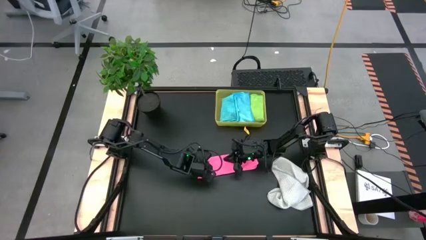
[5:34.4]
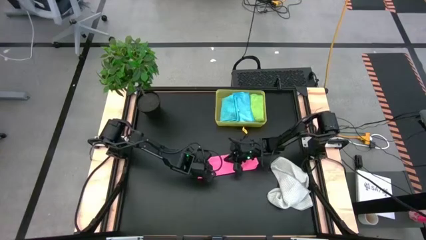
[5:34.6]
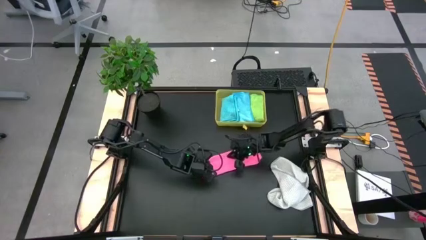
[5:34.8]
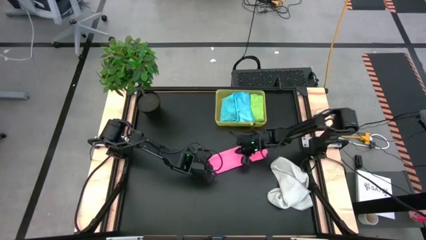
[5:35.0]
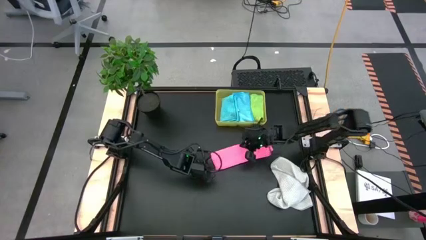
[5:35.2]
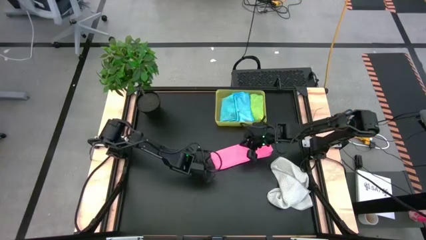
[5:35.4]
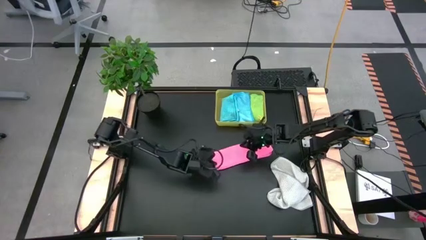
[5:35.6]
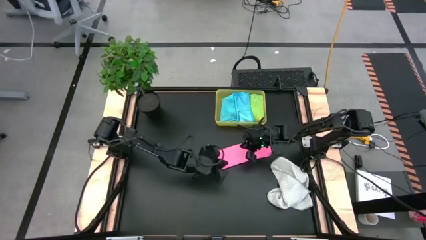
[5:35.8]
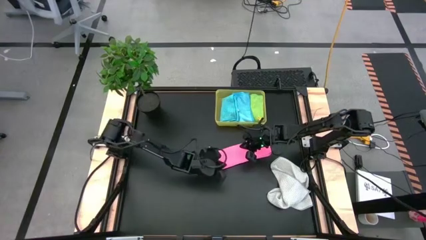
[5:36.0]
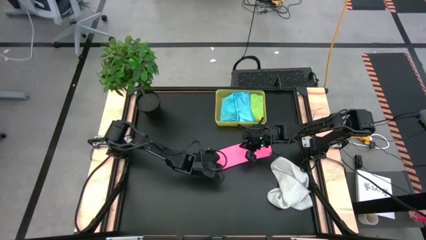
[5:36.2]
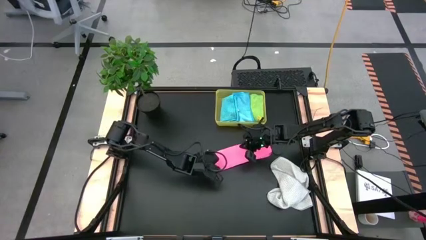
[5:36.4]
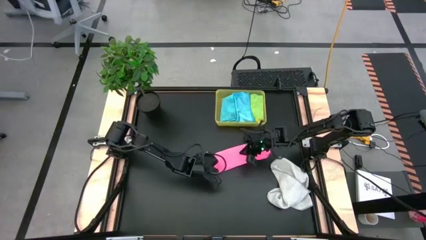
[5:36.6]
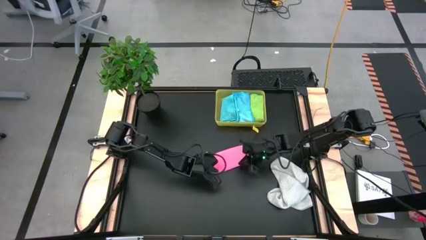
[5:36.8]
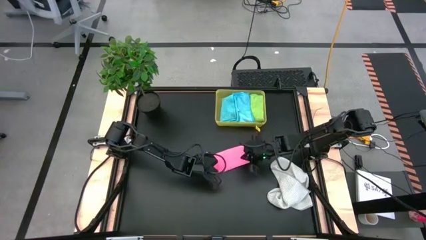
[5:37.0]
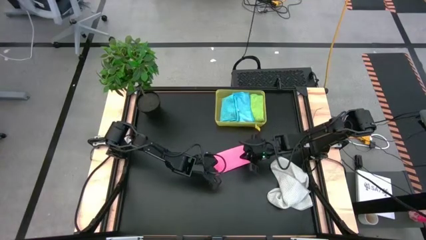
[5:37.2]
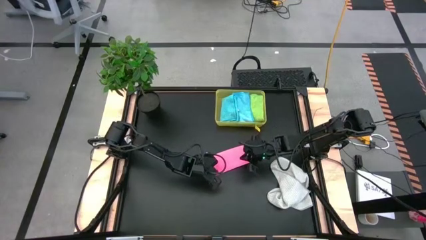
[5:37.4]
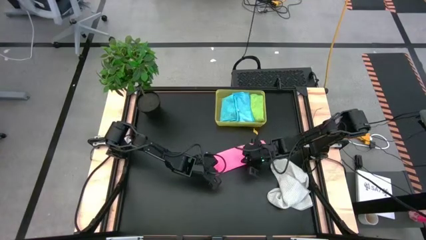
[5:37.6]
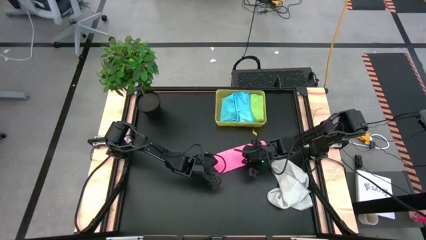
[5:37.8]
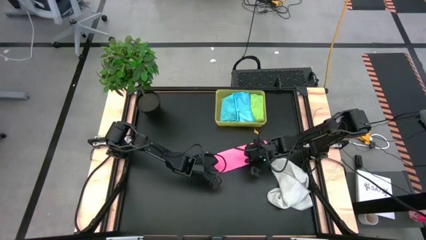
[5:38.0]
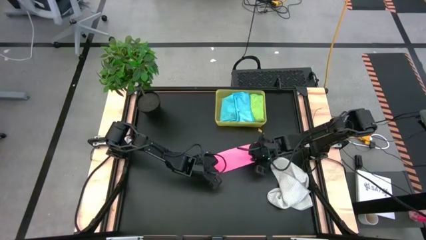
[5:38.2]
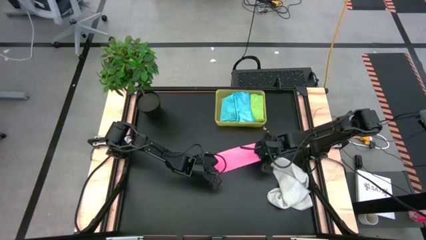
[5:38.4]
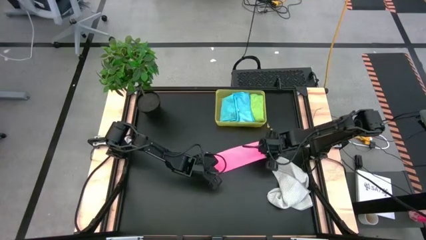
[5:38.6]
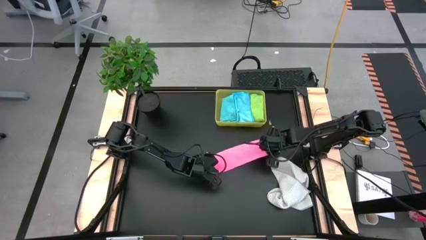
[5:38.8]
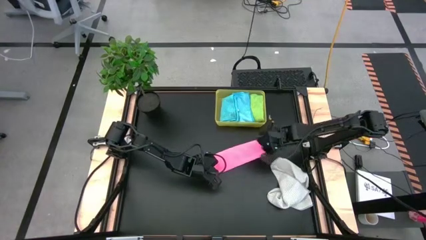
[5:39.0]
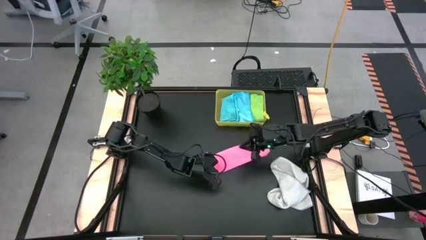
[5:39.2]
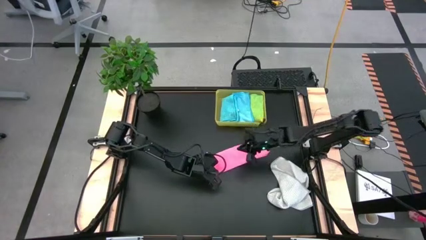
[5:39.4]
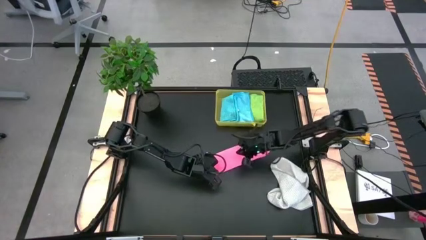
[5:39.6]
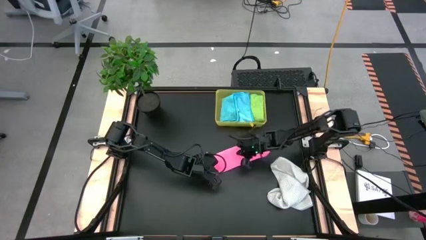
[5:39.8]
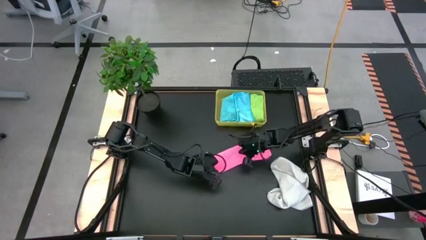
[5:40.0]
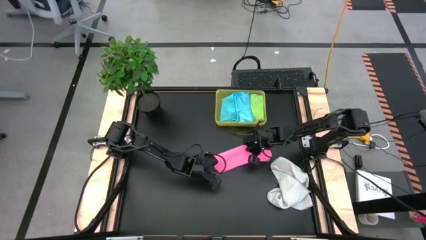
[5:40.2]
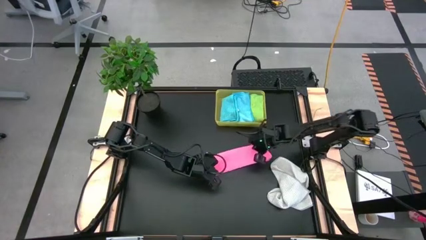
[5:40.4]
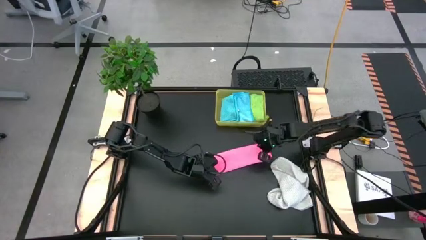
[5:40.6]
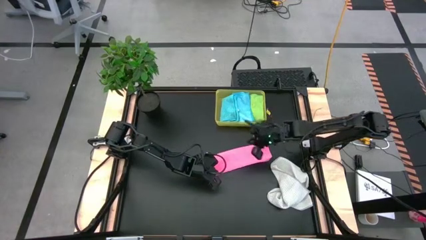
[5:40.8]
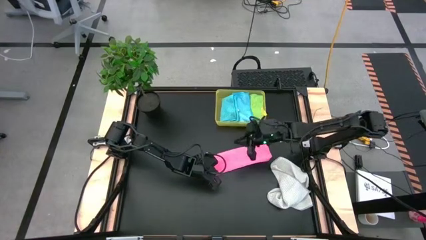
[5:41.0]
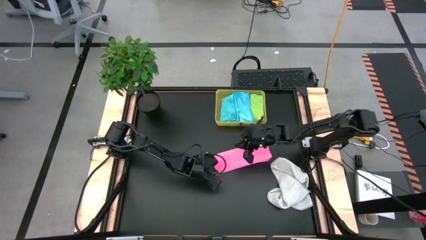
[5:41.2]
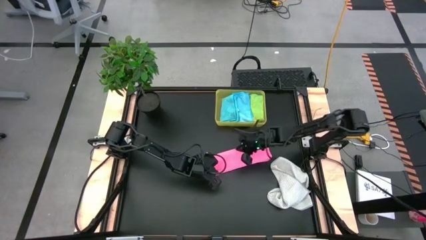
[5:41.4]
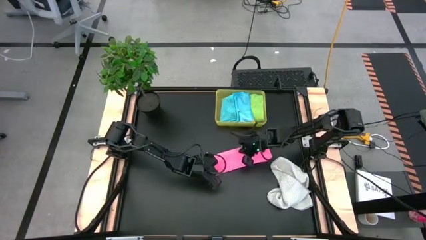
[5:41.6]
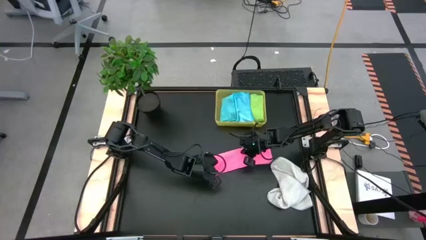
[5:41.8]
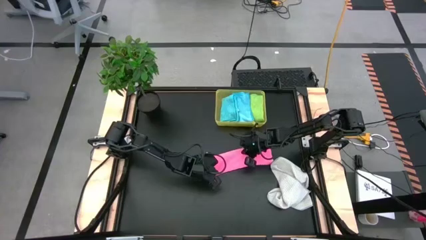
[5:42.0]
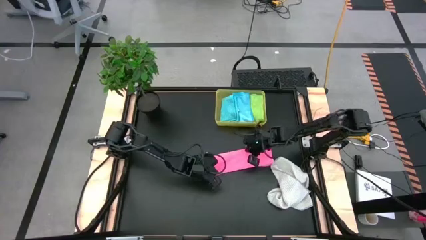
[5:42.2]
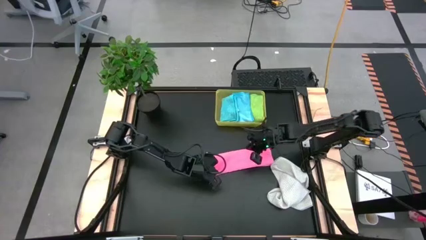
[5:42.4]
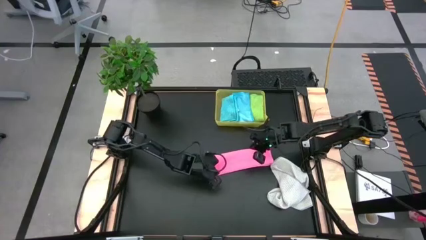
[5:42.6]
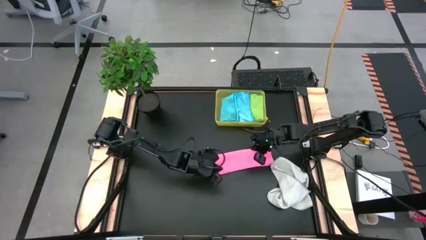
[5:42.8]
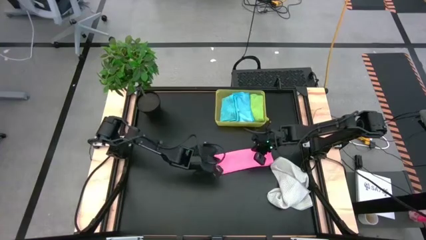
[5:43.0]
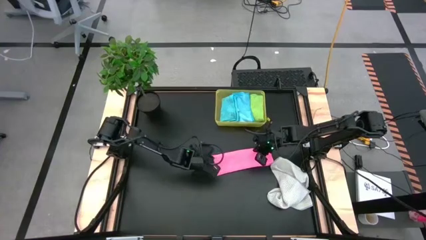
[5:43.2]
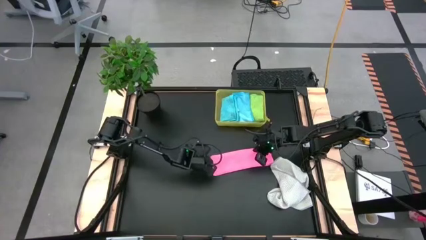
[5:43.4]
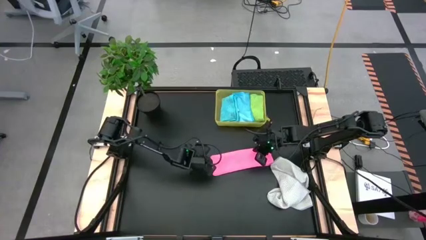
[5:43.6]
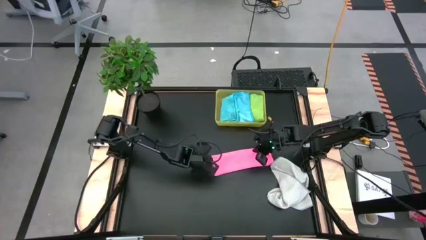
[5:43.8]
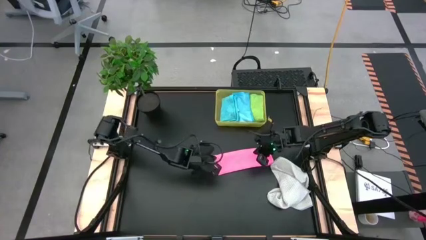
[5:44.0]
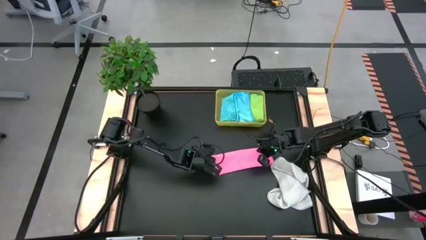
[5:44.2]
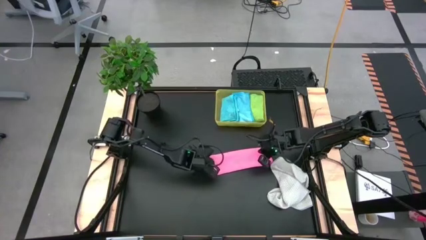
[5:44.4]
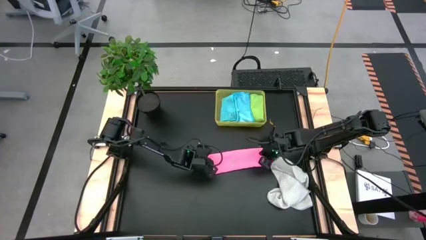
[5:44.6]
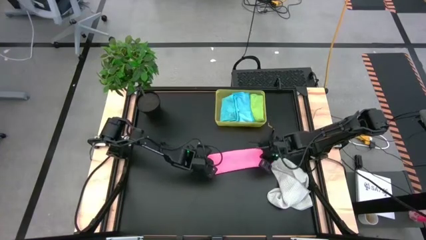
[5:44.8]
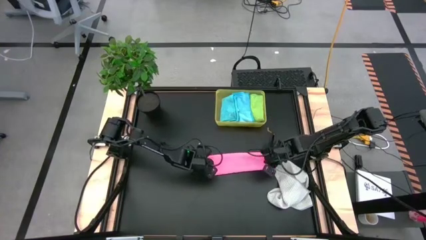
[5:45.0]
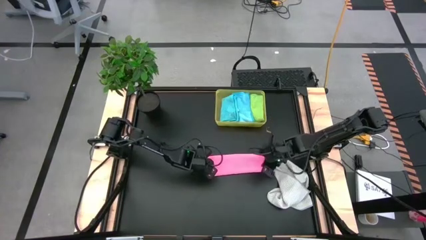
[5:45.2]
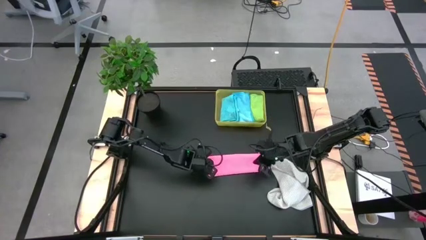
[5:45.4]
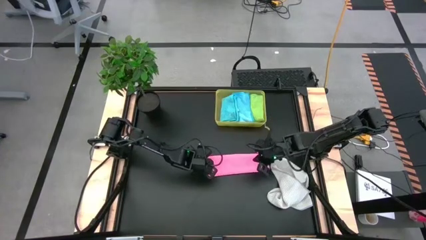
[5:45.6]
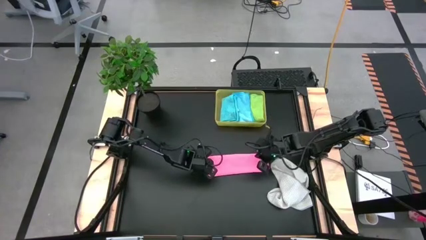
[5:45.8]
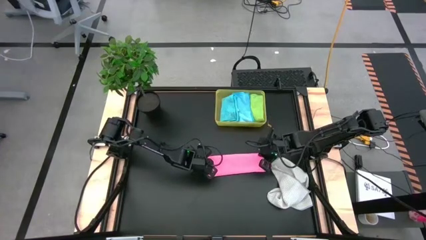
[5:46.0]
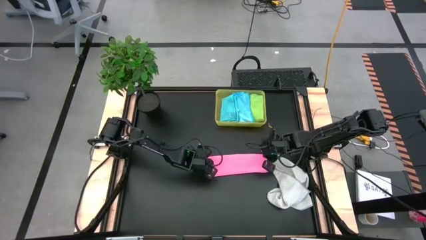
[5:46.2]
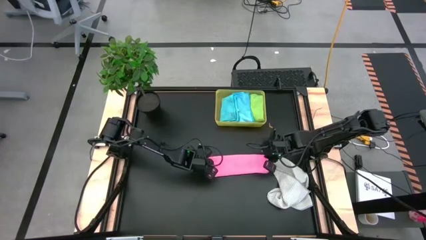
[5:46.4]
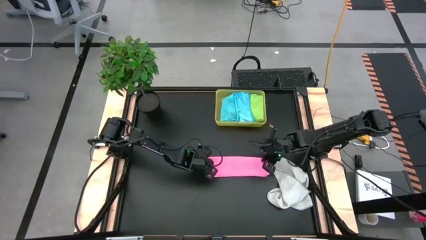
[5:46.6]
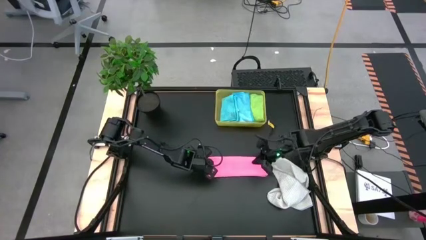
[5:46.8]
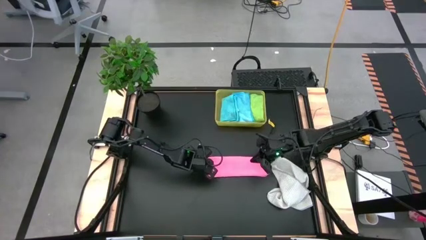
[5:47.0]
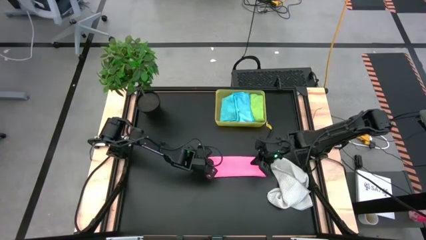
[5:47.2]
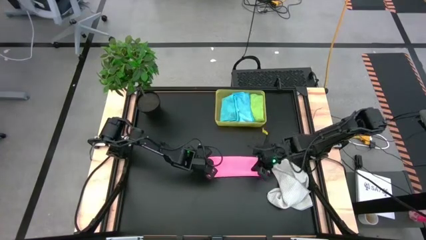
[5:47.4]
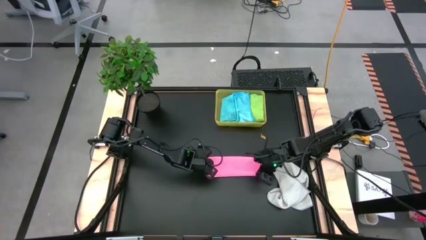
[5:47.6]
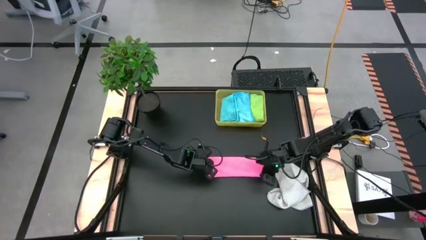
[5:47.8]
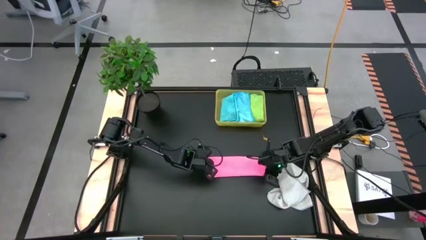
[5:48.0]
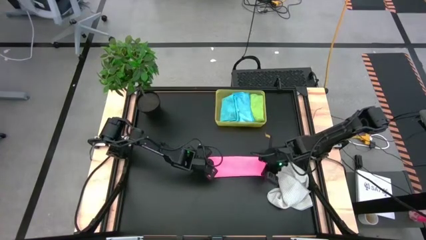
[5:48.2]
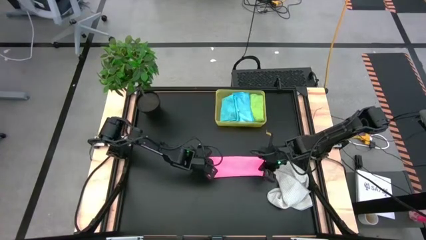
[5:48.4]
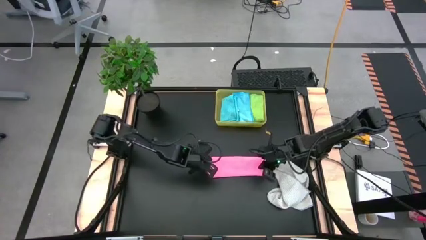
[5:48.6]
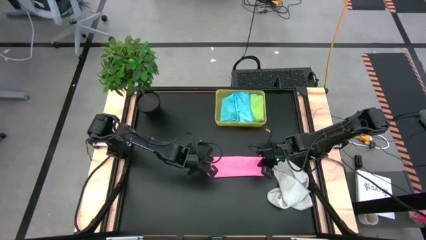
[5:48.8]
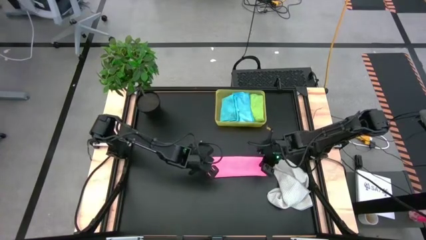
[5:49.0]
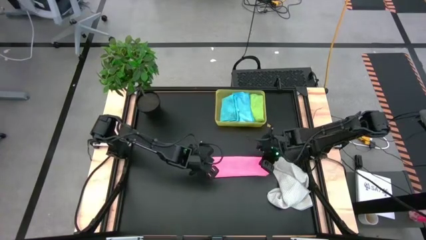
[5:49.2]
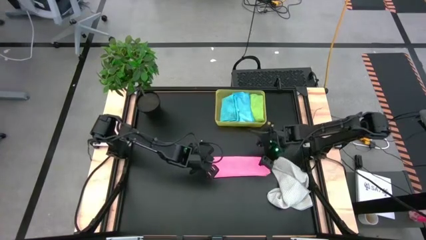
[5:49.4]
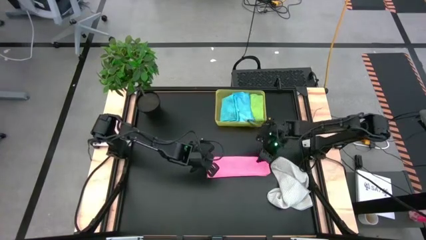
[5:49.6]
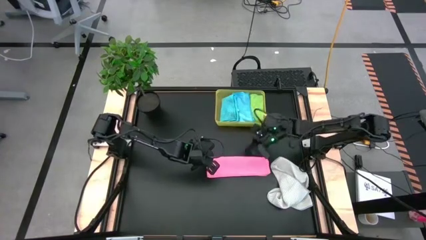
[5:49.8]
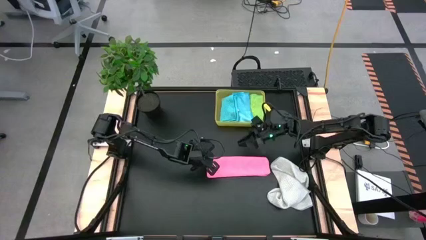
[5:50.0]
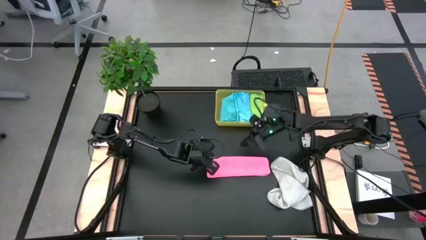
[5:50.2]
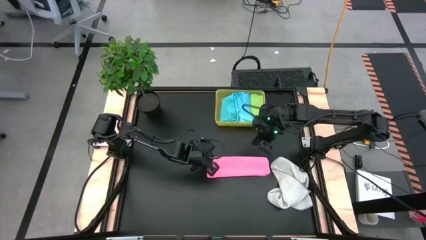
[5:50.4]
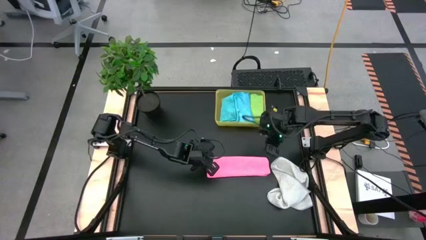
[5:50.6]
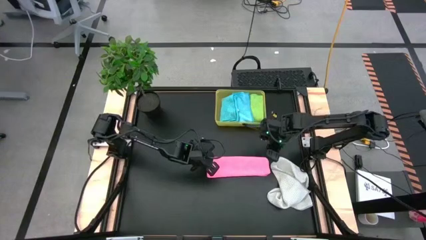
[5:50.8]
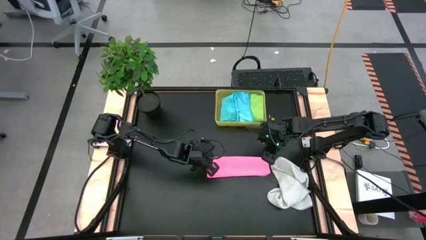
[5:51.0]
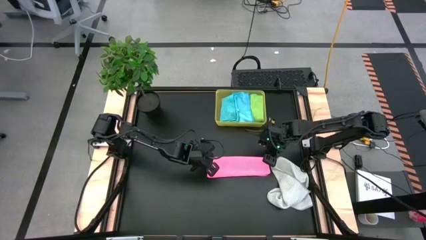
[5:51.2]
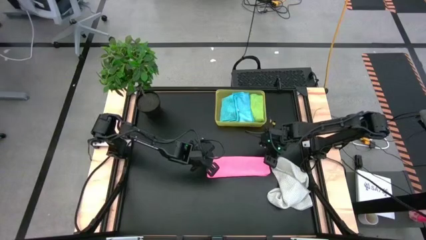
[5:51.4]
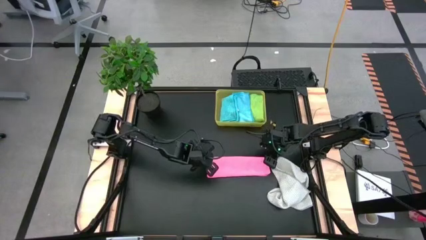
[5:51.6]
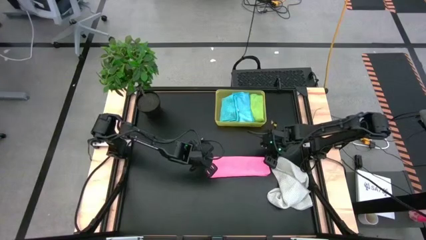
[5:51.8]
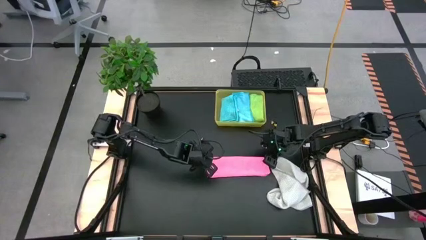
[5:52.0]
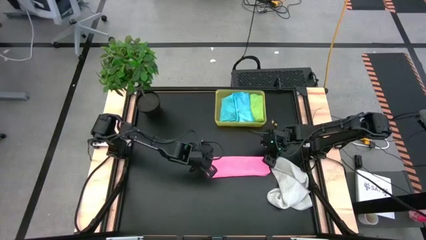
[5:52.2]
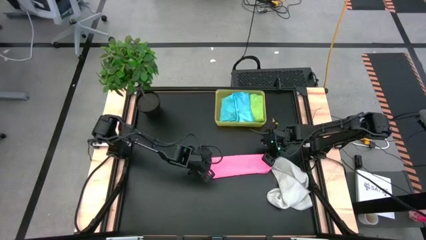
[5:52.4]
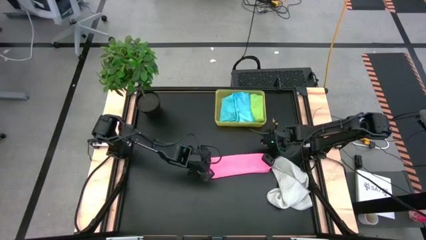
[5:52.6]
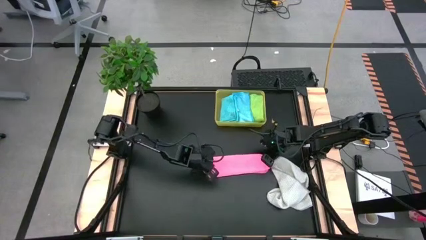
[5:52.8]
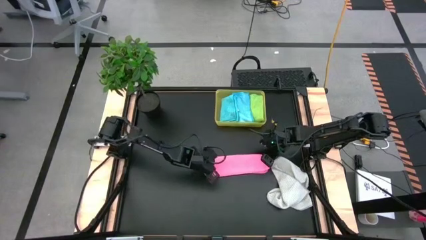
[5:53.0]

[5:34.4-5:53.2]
Task: Fold microfiber towels
Fold the pink microfiber cloth
